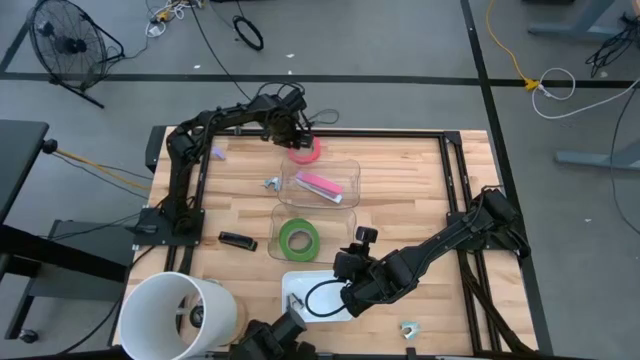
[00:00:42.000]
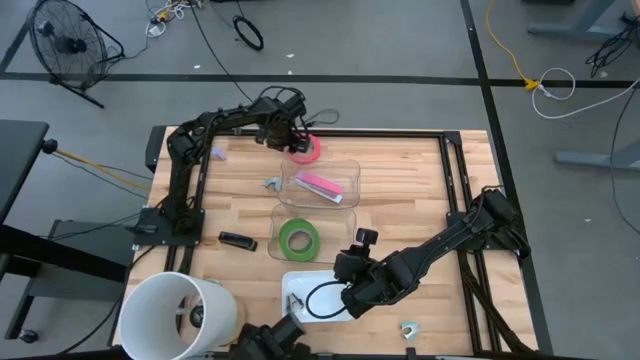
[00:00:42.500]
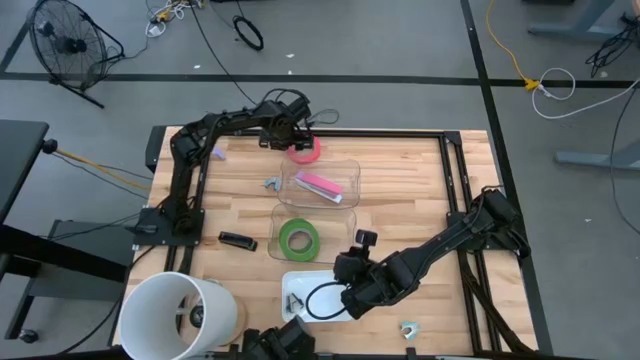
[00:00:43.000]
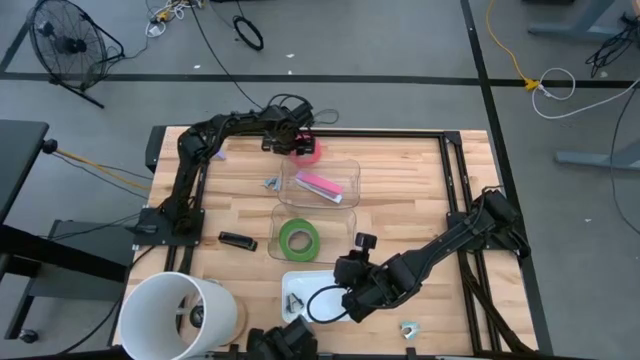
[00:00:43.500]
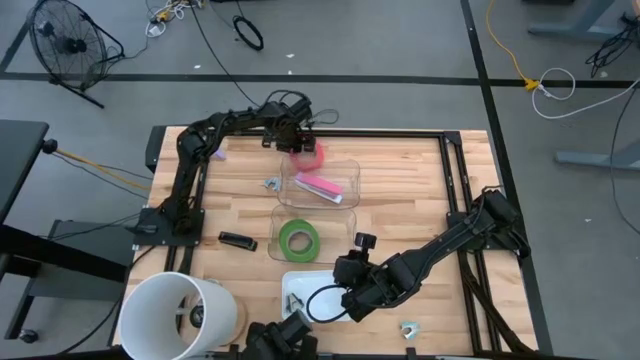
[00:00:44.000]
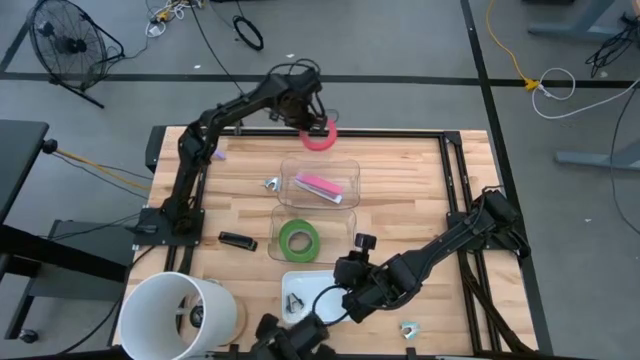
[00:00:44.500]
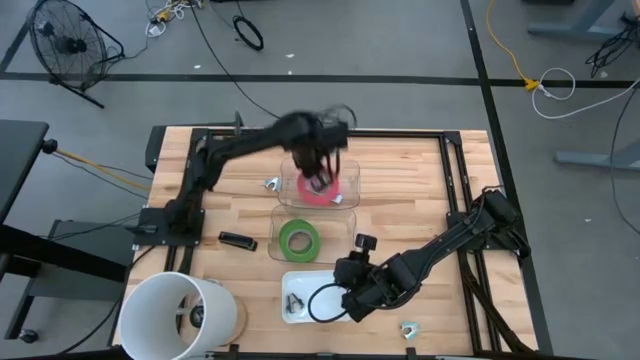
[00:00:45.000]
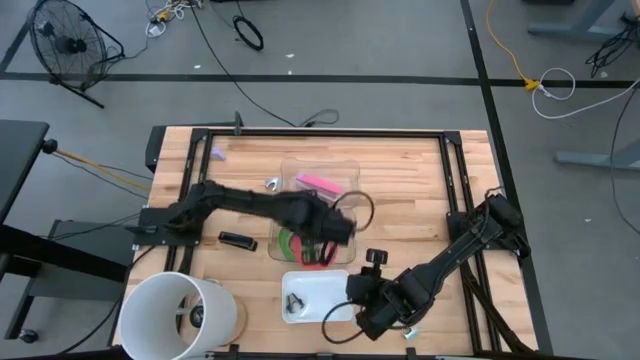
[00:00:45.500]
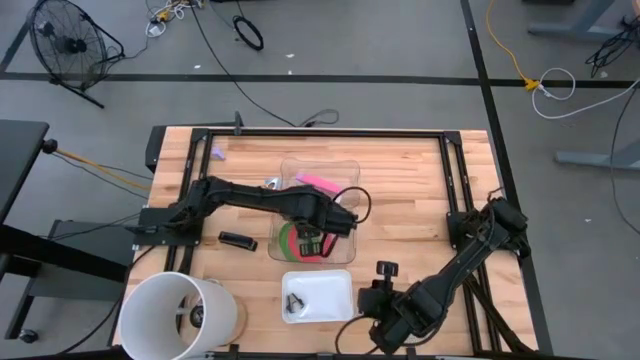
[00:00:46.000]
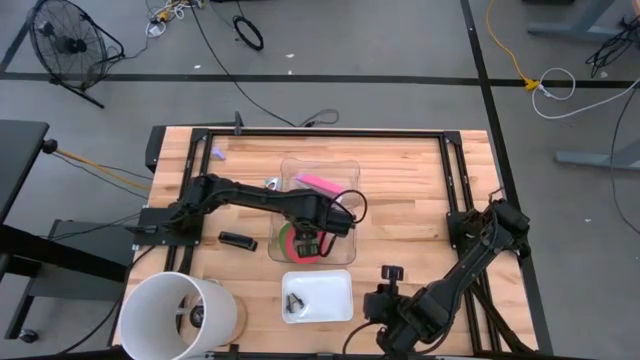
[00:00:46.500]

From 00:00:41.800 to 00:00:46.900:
Task: Pick and place Stapler, Stapler remover, tape
Put the pink tape into the bottom transparent bin

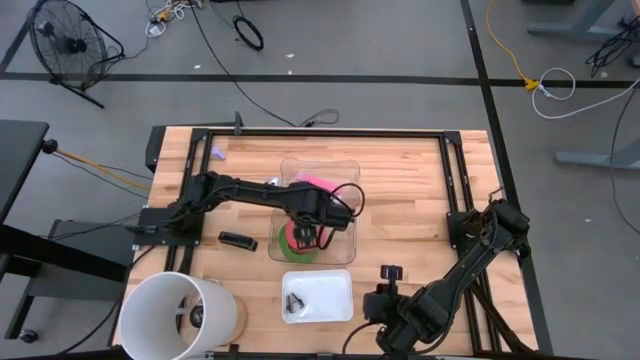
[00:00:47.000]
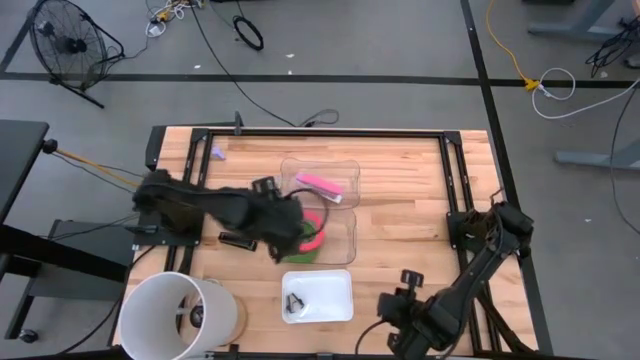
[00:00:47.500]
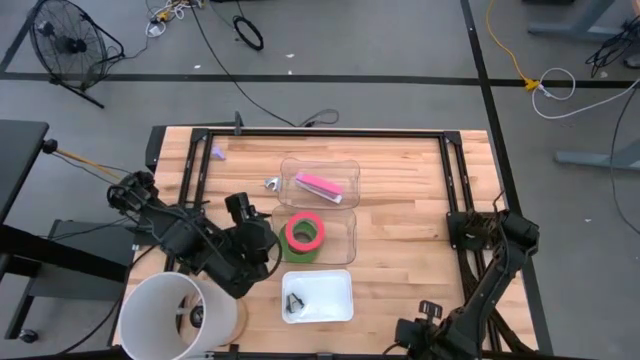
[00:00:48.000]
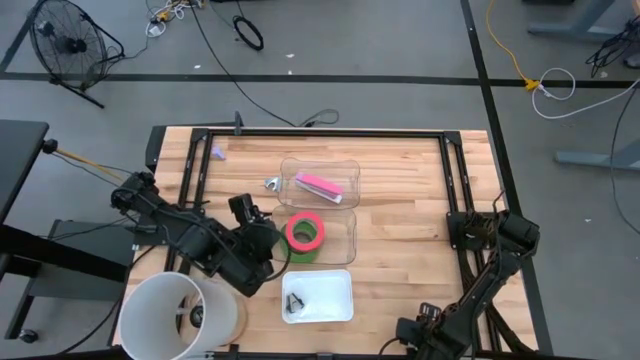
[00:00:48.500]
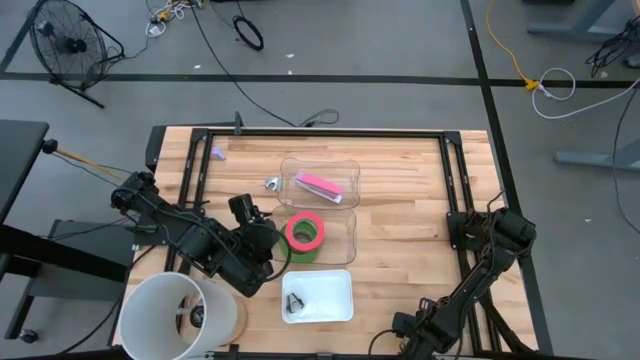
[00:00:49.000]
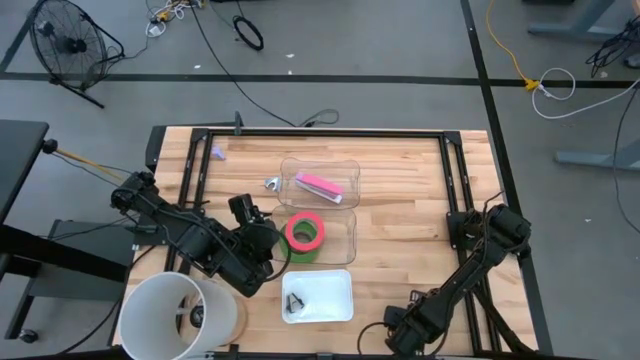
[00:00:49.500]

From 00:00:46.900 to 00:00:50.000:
Put the bottom blue staple remover into the white bin

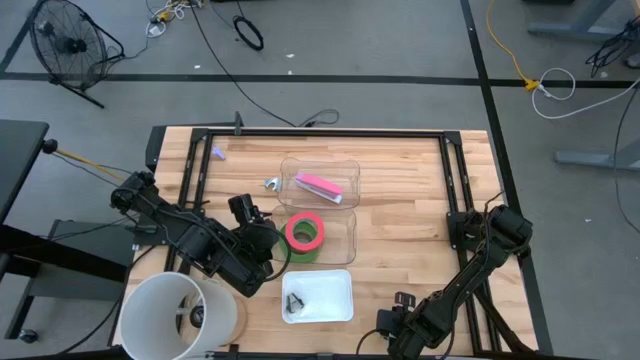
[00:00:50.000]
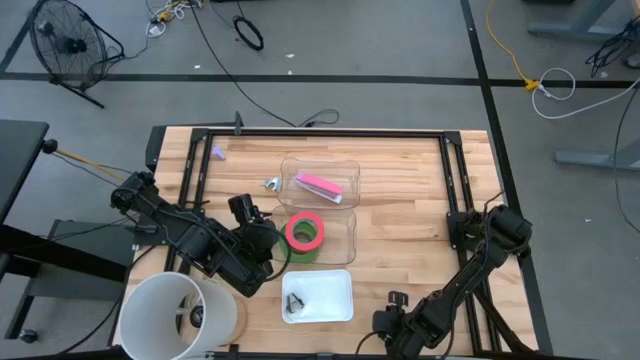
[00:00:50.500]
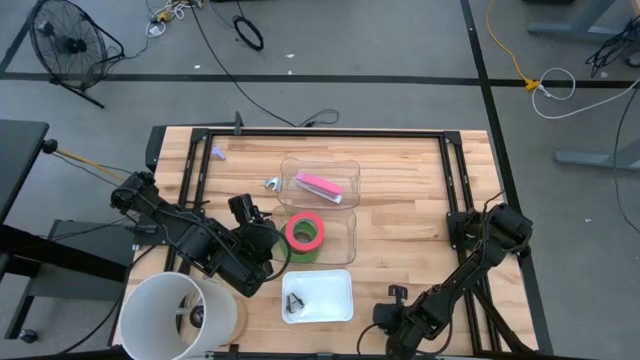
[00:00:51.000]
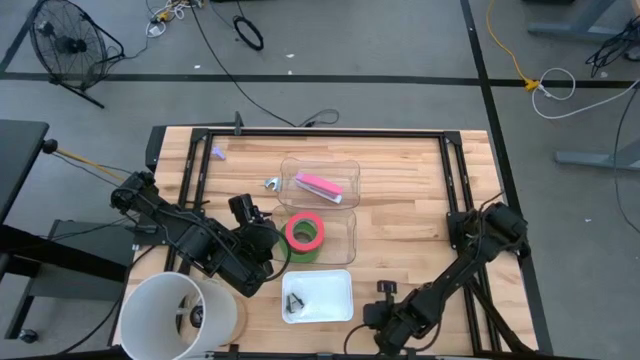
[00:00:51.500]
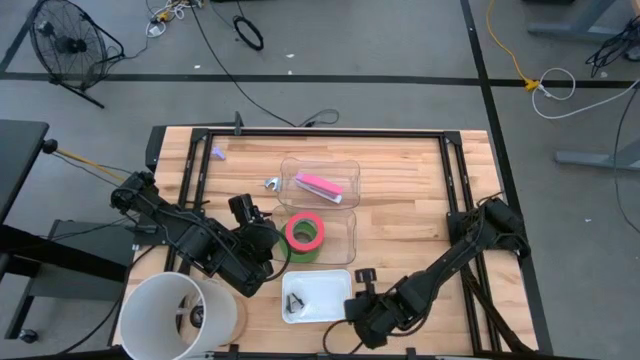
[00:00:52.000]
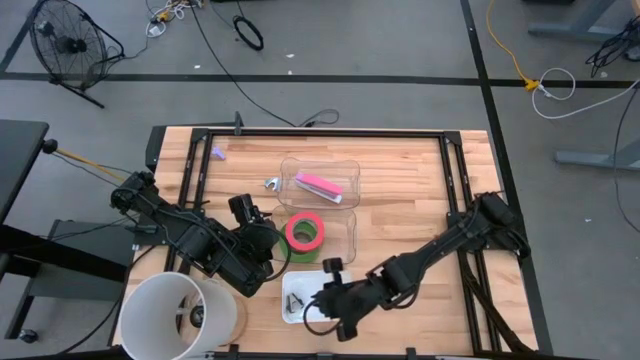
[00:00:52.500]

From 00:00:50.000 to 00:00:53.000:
Put the bottom blue staple remover into the white bin

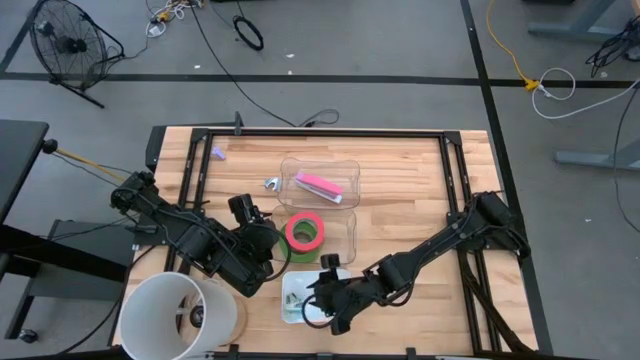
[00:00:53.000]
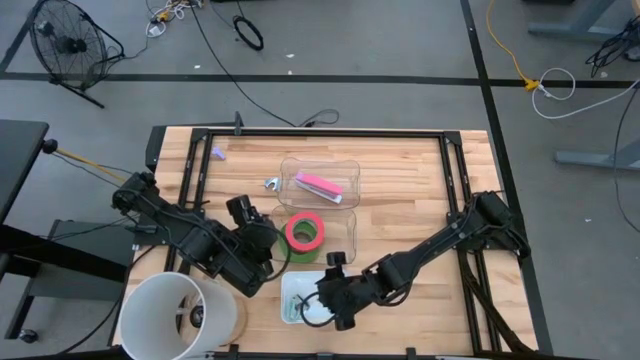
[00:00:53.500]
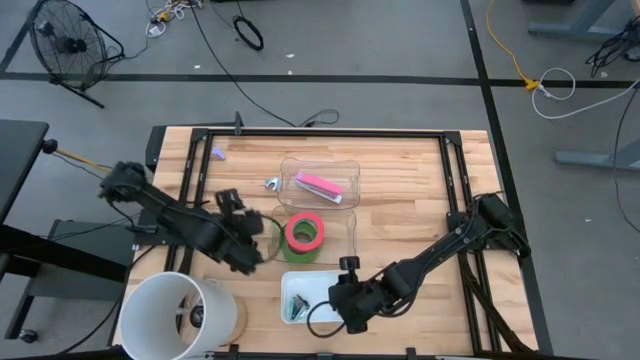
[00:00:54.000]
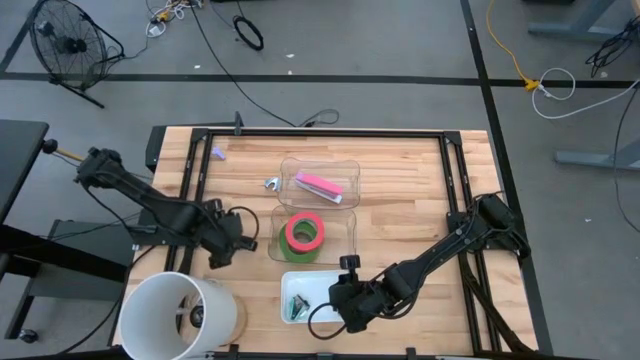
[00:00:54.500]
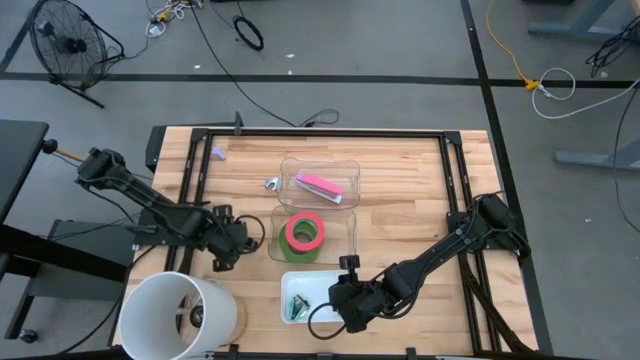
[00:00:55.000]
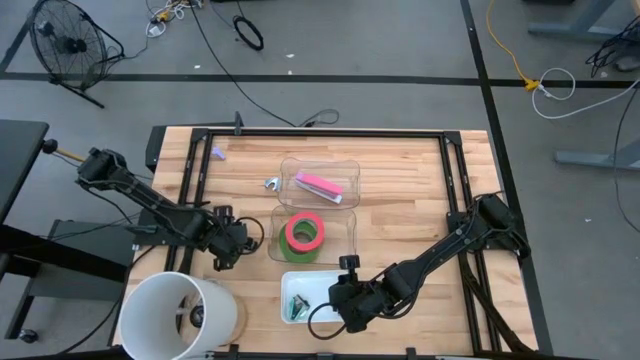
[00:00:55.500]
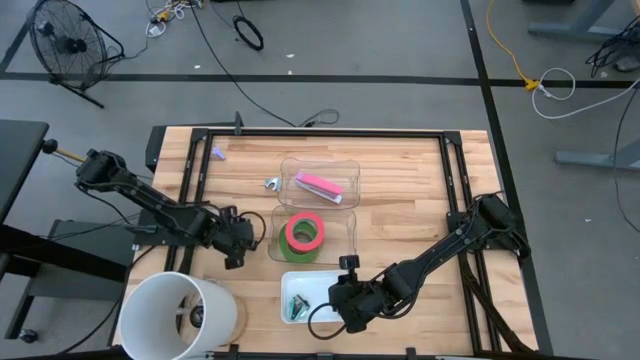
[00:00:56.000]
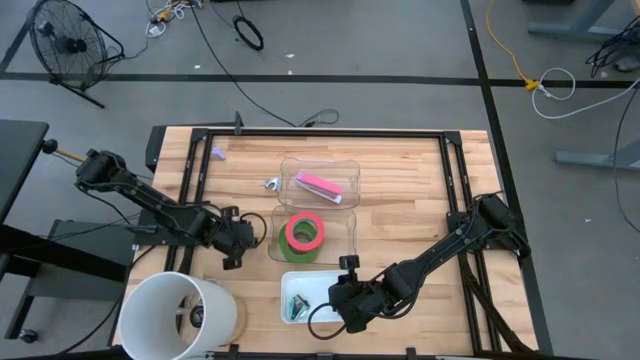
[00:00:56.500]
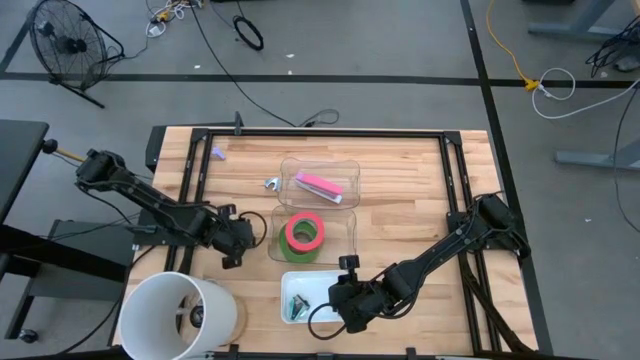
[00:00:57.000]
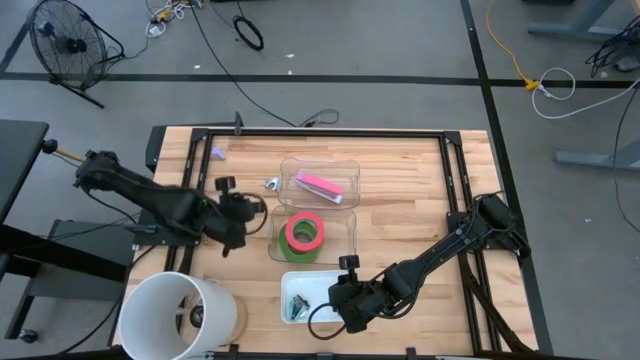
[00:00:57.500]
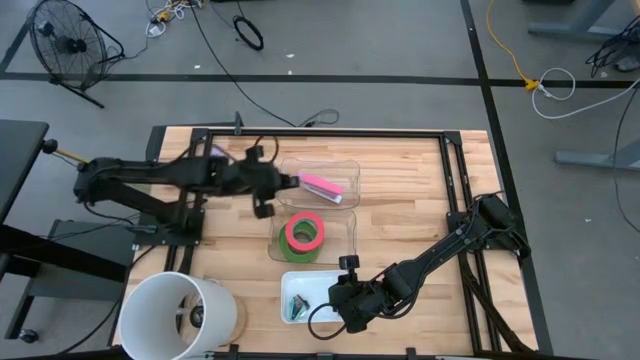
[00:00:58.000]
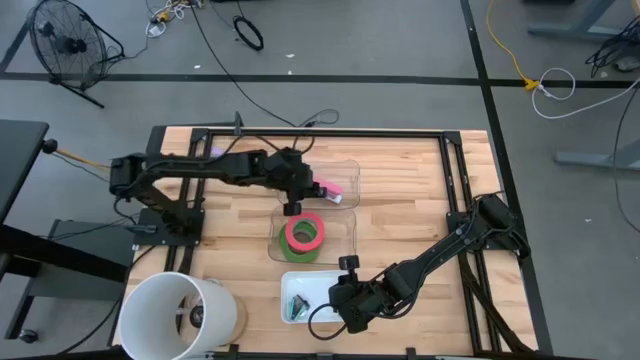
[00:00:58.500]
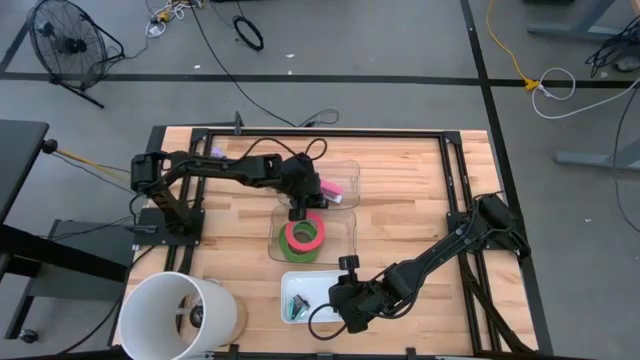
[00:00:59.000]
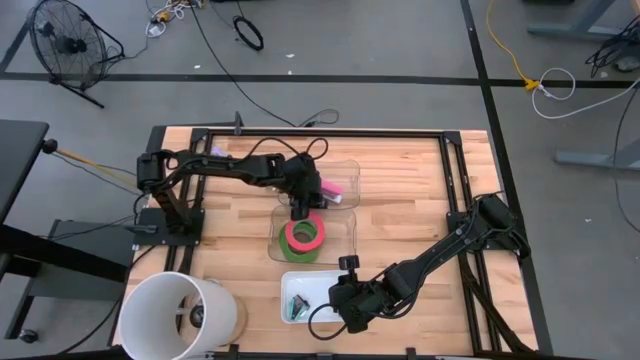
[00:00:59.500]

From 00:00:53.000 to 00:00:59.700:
Put the black stapler into the top transparent bin

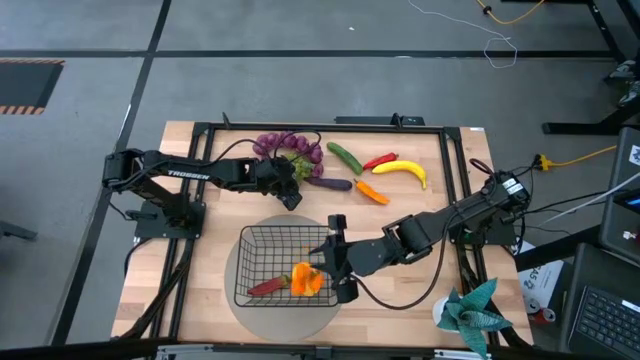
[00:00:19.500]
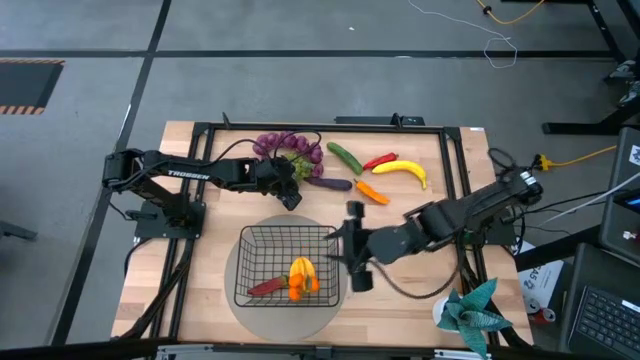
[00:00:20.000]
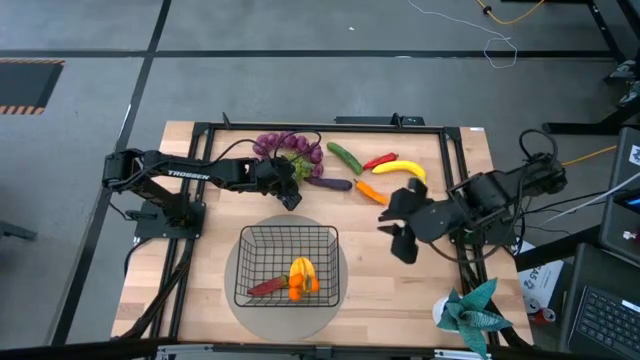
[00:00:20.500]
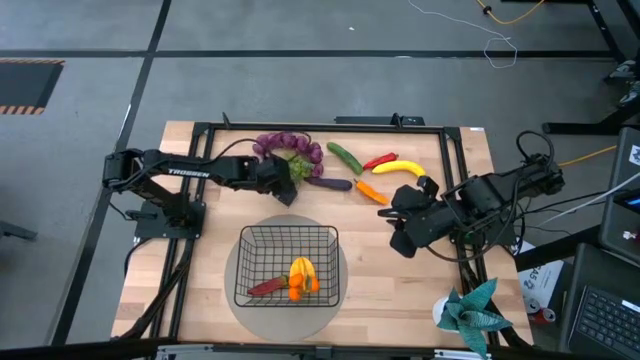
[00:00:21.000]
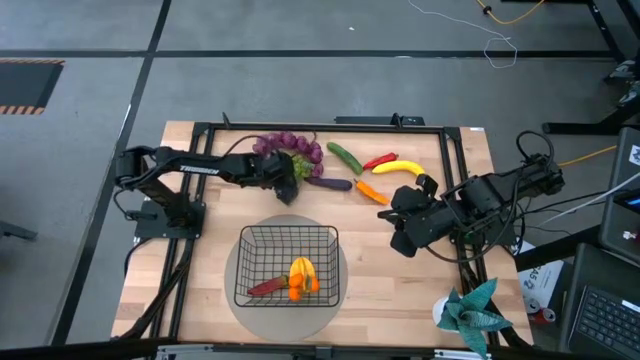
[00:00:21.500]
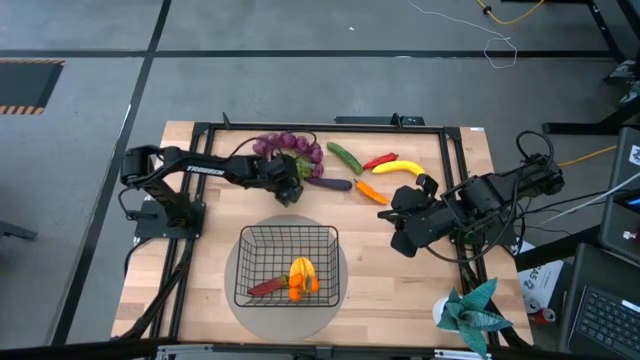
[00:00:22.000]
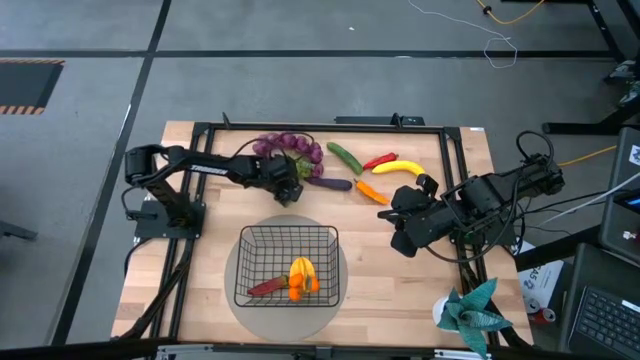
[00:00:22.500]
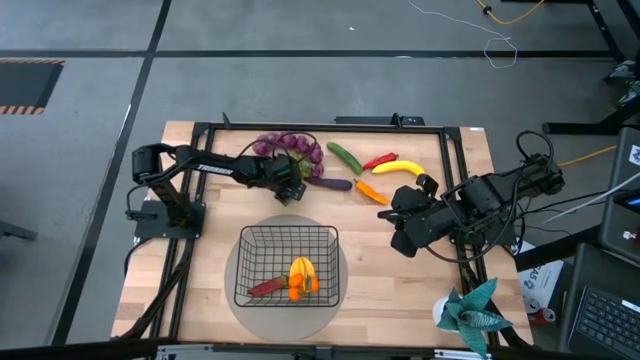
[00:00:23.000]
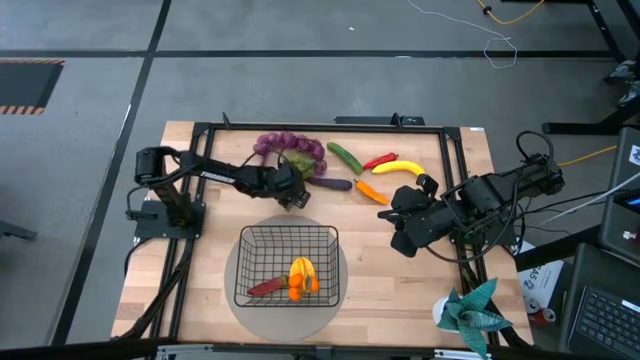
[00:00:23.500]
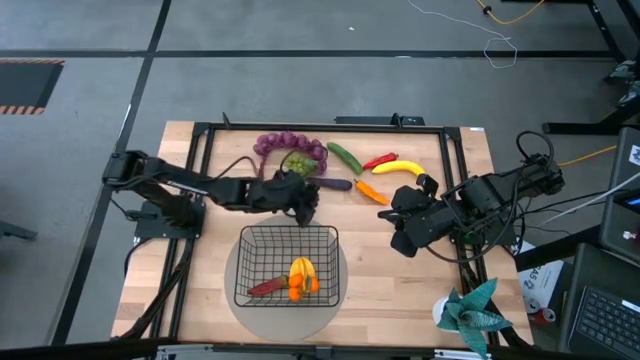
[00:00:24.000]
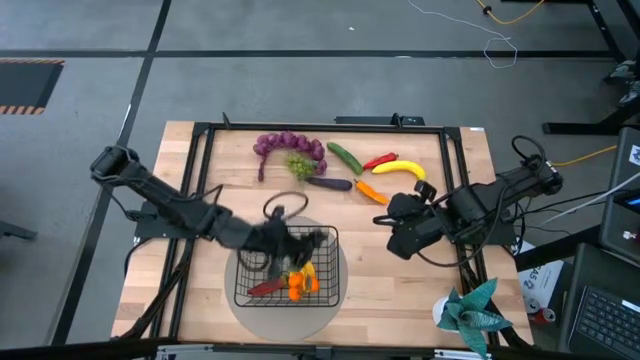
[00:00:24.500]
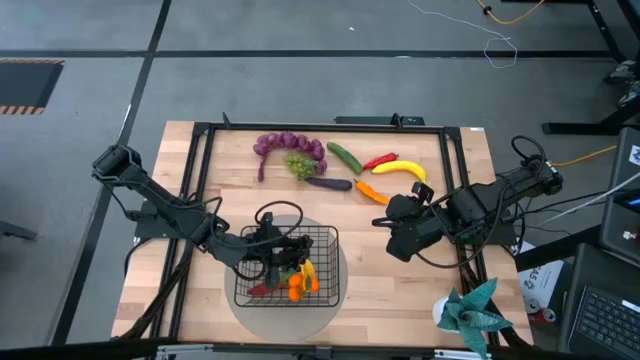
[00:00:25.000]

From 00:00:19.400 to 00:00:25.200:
Task: Build produce basket
Put the black grapes into the black wire basket
